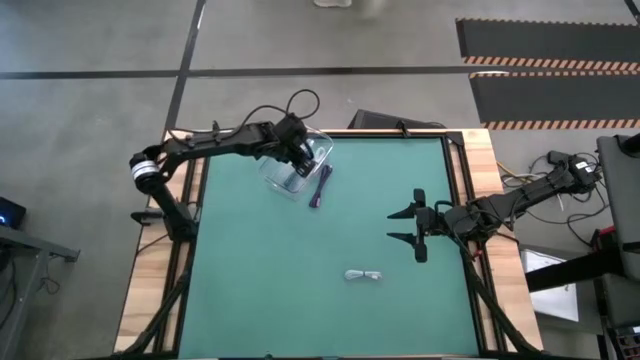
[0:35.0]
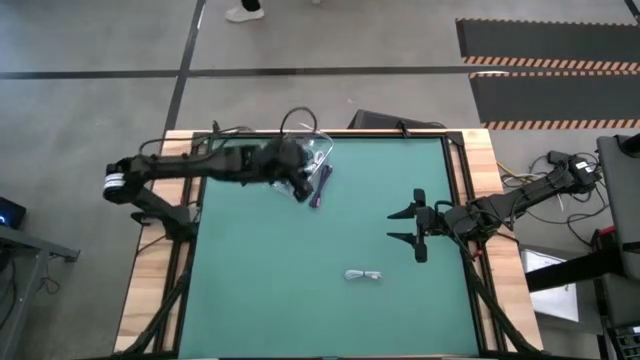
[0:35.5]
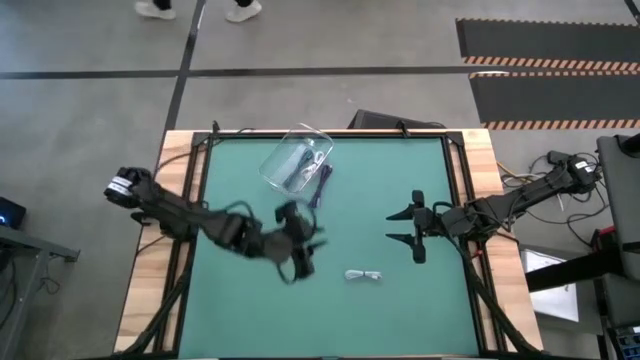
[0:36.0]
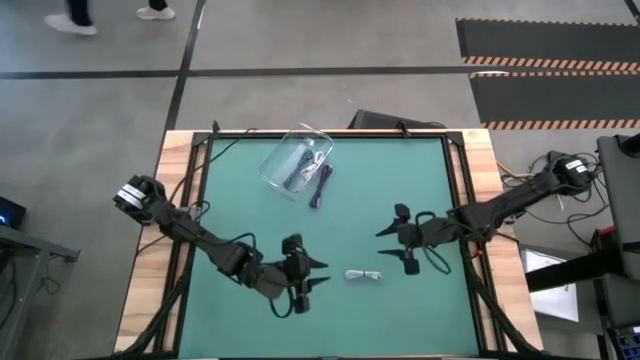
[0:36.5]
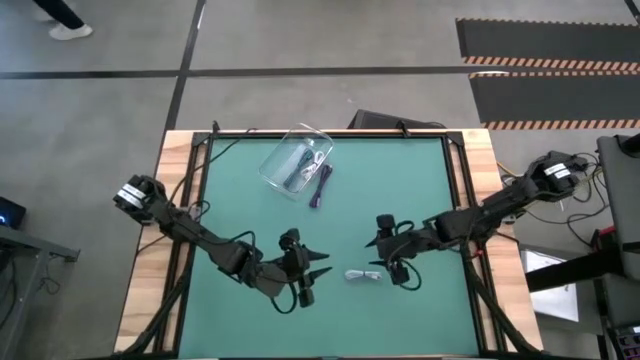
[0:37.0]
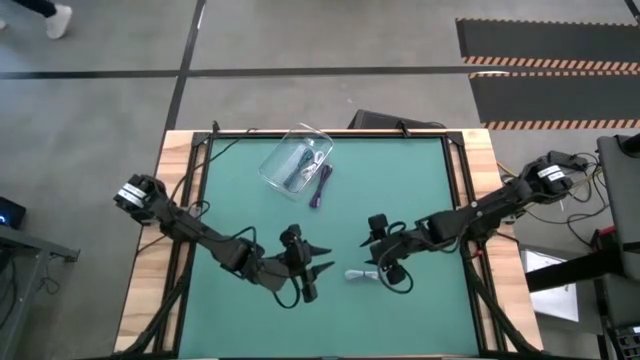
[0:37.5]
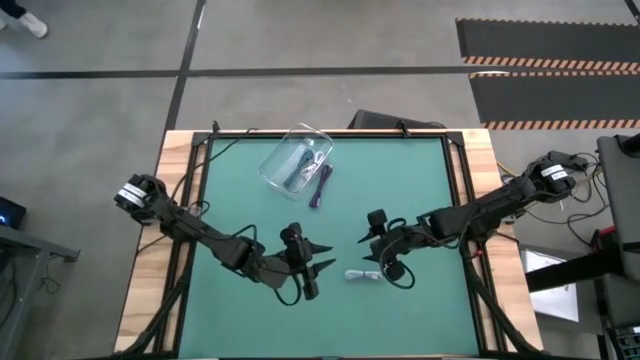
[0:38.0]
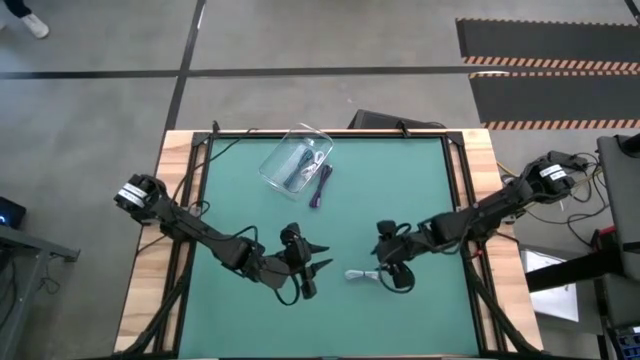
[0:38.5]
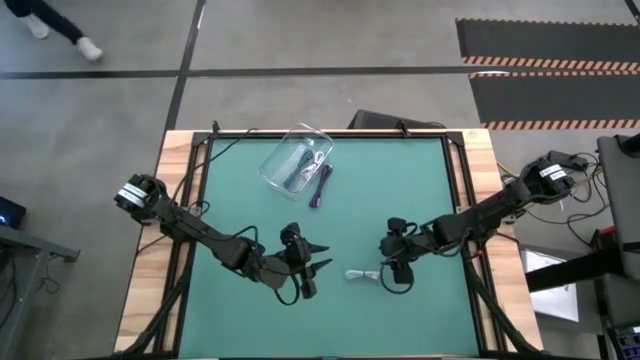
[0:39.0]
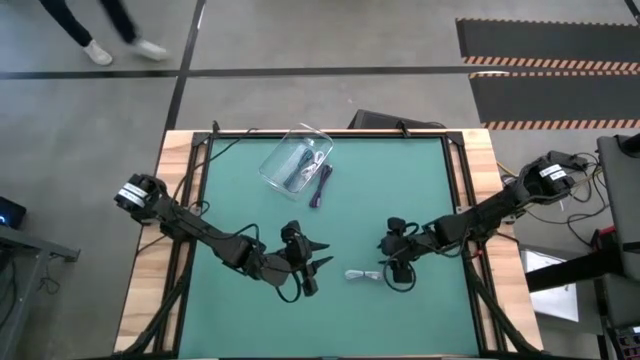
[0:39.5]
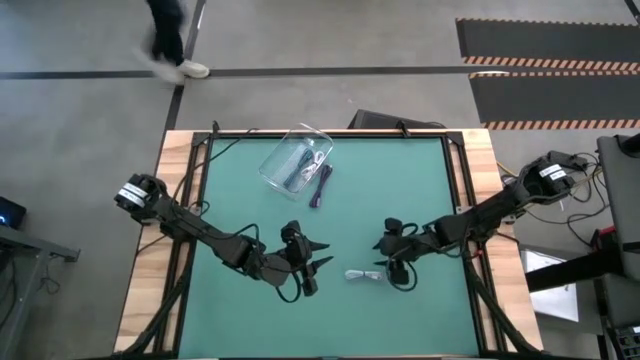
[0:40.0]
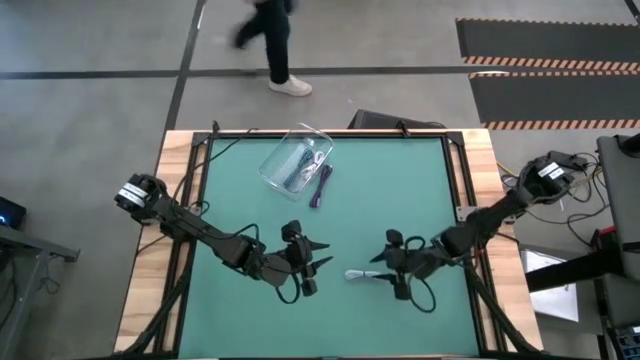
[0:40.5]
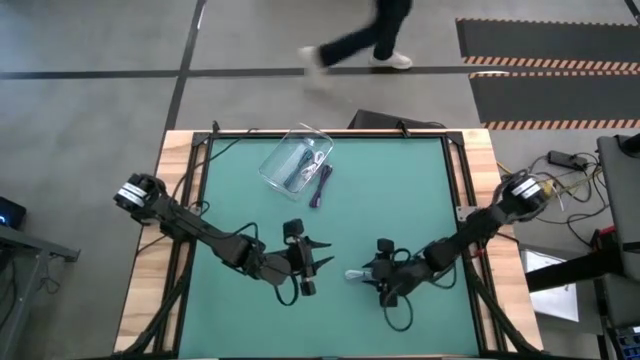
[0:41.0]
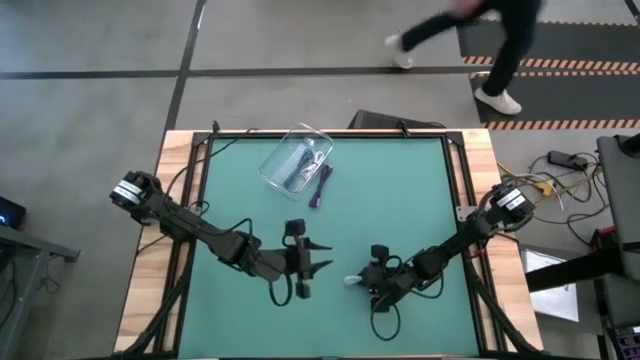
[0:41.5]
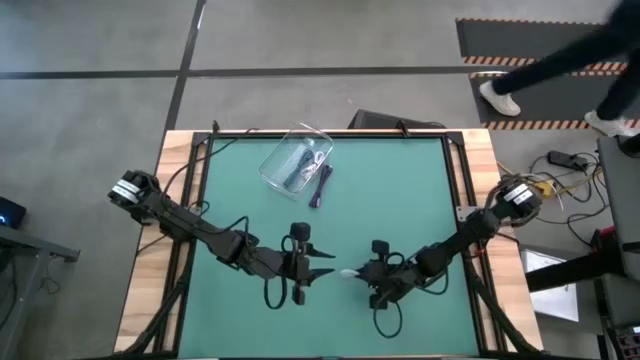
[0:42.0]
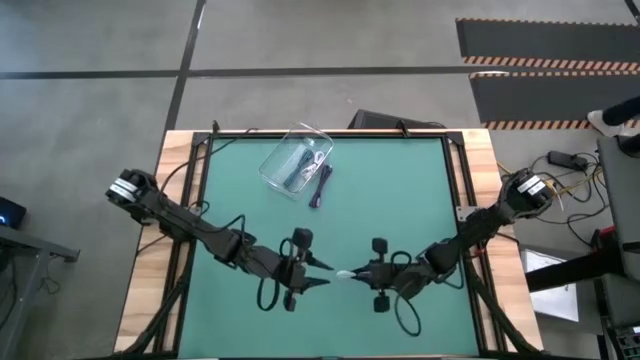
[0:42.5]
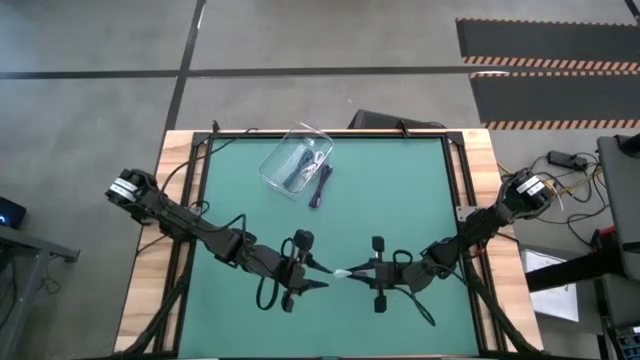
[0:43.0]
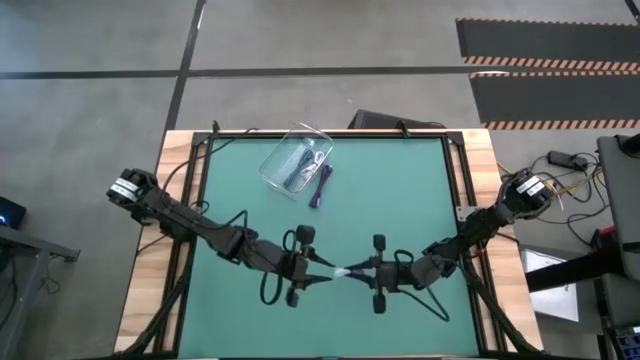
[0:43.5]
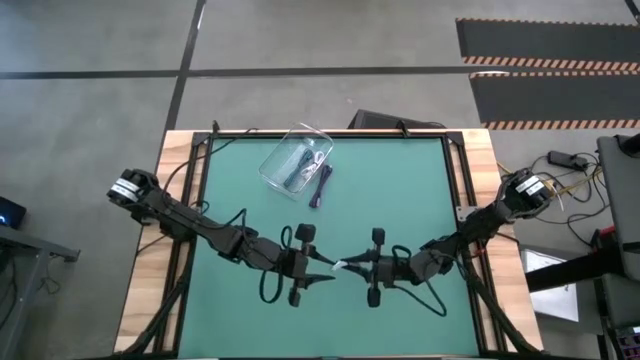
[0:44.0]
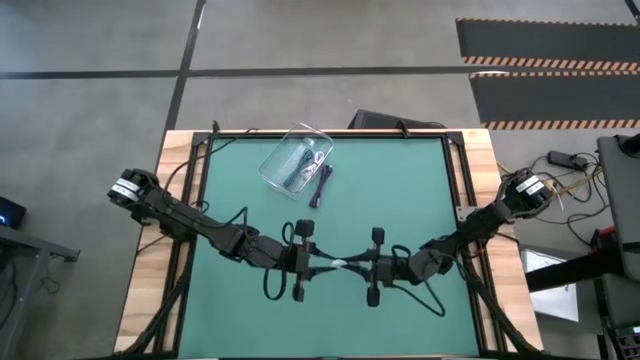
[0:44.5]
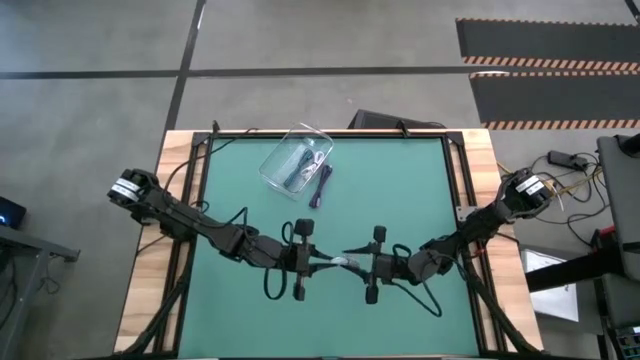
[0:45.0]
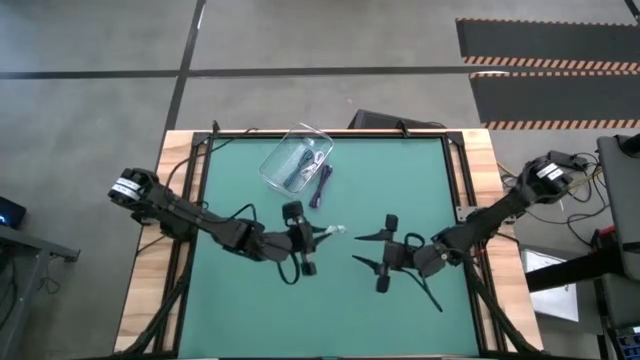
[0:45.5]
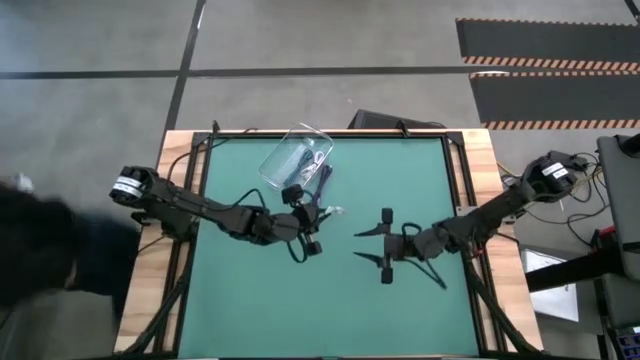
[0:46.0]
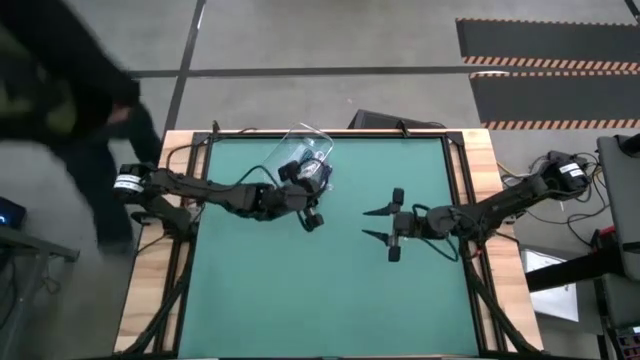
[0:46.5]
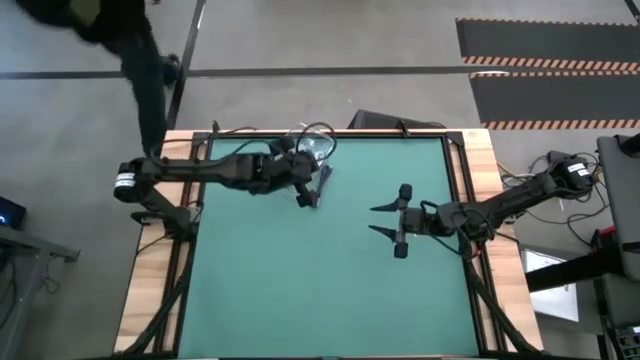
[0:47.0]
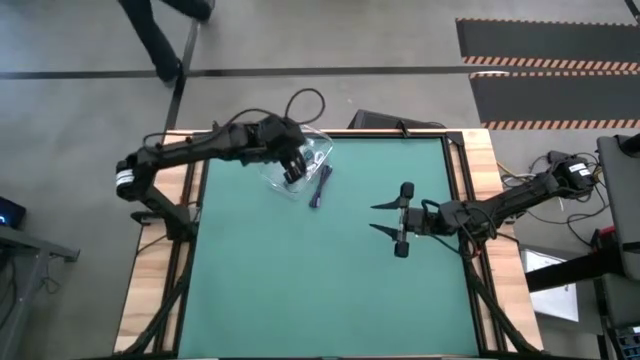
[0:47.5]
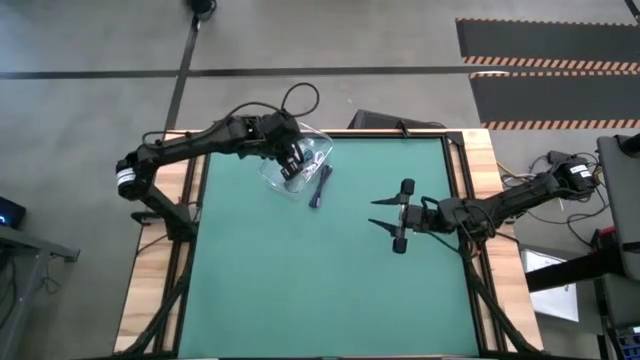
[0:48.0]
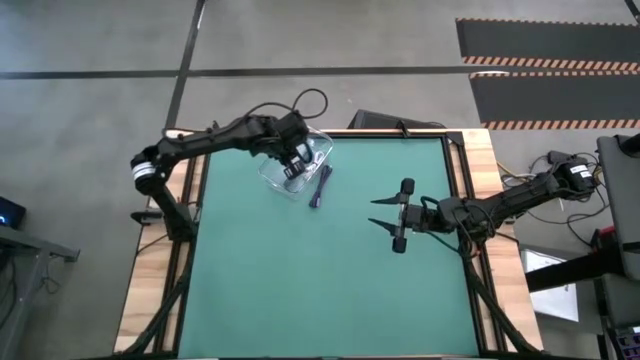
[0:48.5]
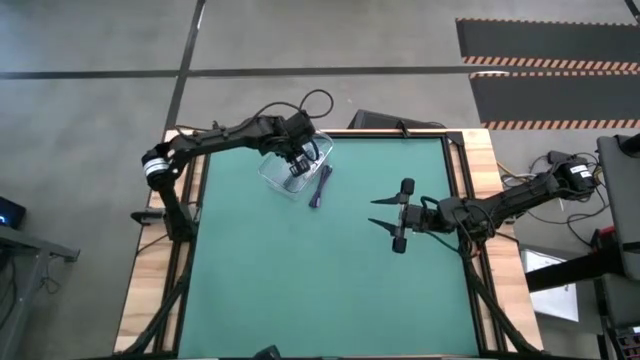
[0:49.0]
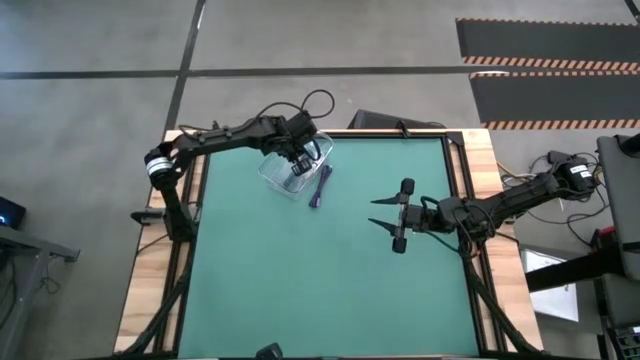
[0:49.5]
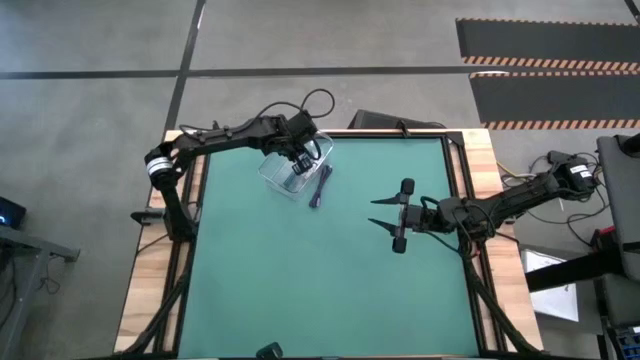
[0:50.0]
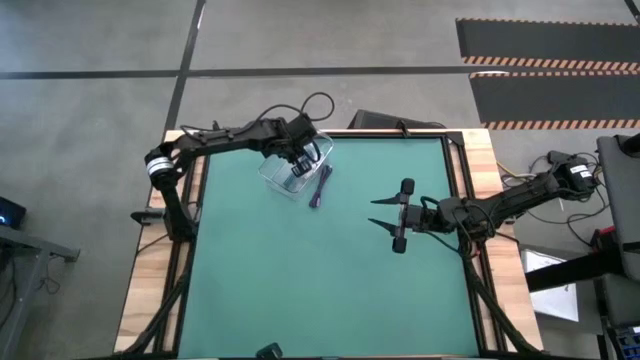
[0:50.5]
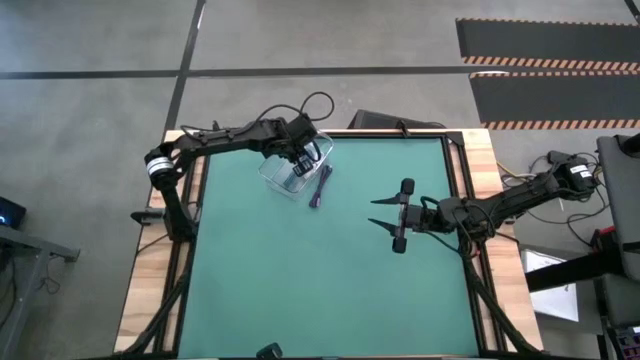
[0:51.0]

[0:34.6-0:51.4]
Task: Pick and place USB-C Cables
Put the white USB cable into the transparent bin
